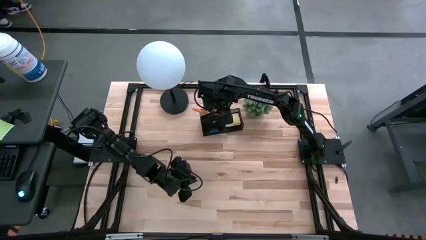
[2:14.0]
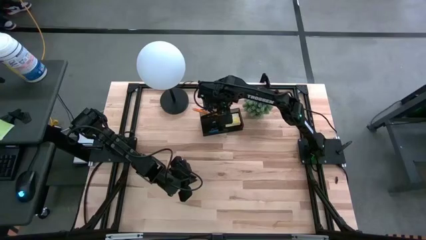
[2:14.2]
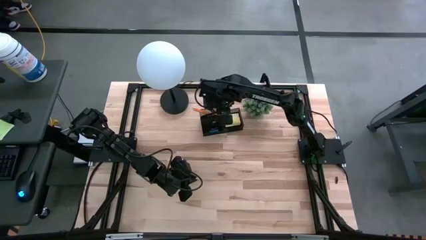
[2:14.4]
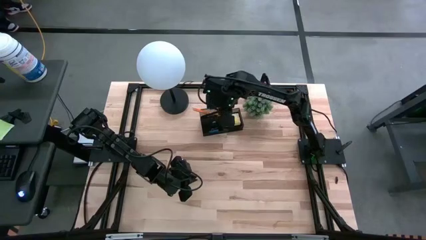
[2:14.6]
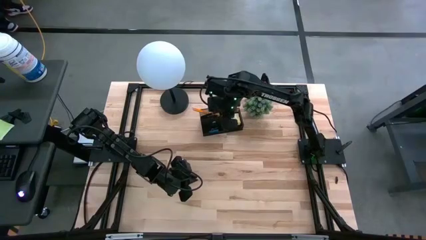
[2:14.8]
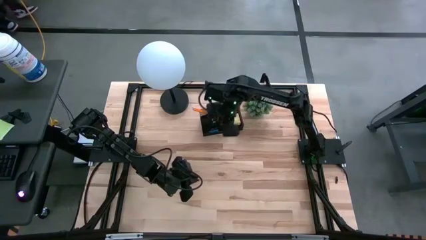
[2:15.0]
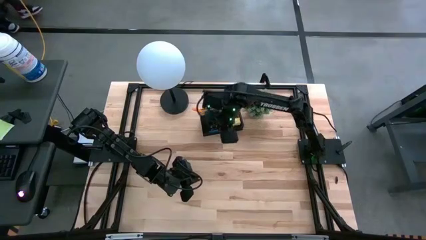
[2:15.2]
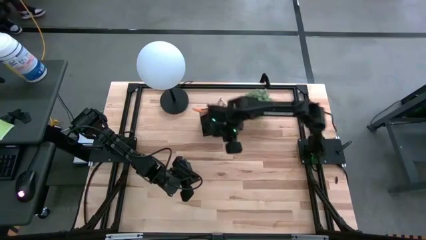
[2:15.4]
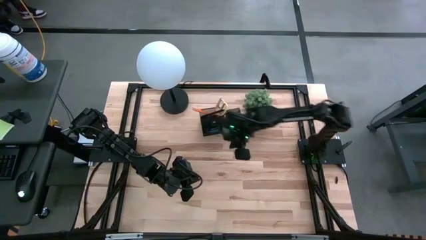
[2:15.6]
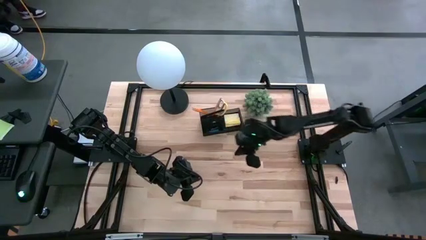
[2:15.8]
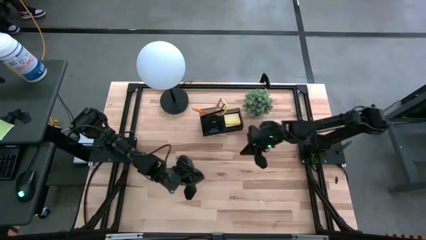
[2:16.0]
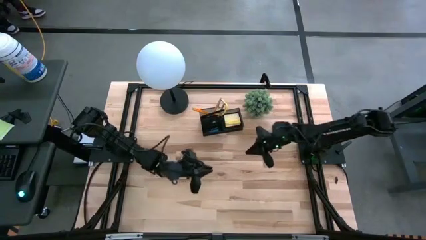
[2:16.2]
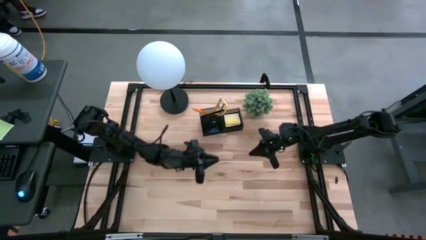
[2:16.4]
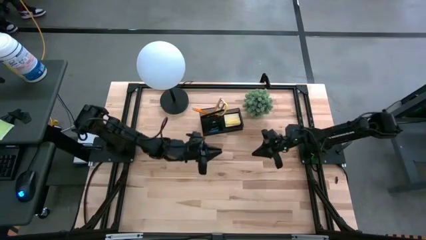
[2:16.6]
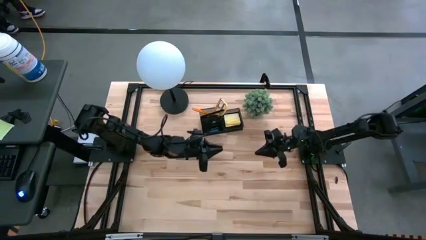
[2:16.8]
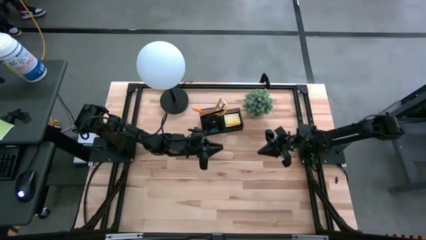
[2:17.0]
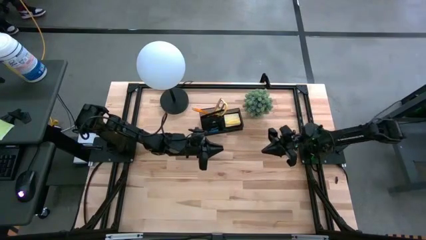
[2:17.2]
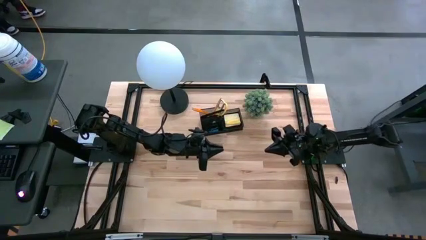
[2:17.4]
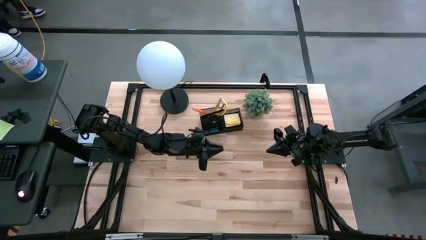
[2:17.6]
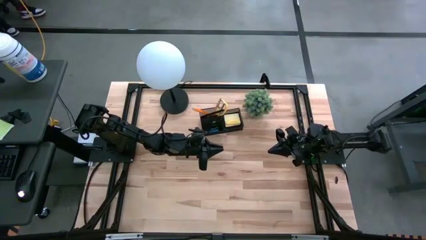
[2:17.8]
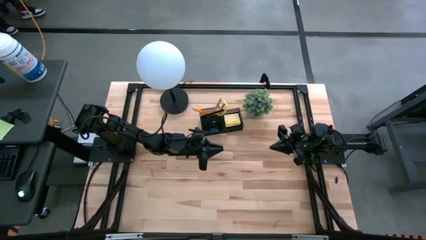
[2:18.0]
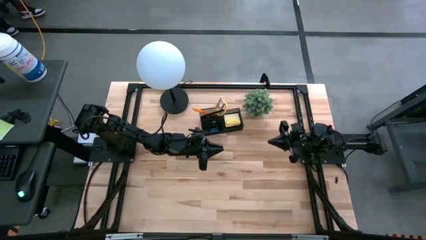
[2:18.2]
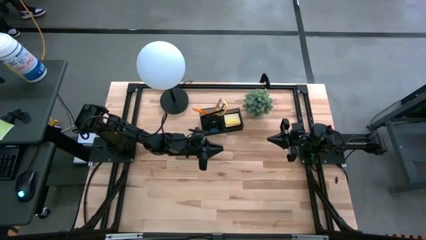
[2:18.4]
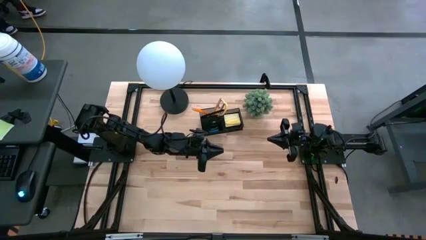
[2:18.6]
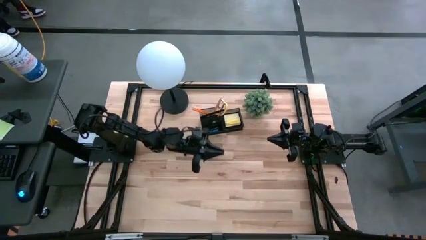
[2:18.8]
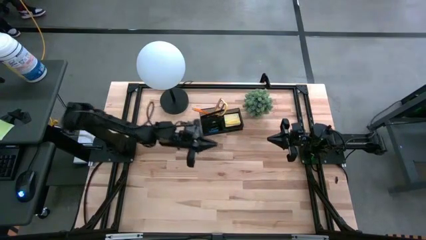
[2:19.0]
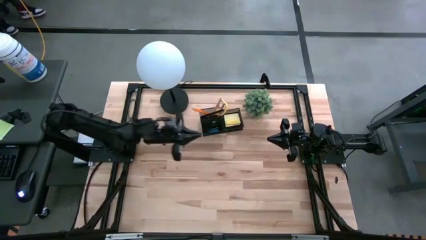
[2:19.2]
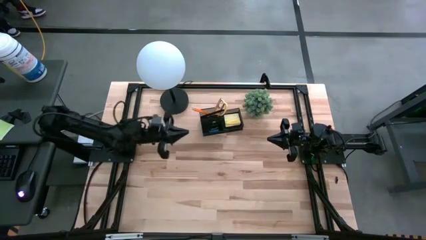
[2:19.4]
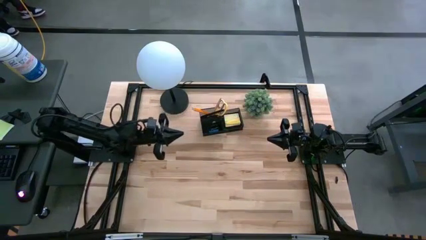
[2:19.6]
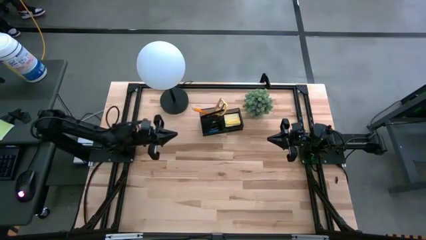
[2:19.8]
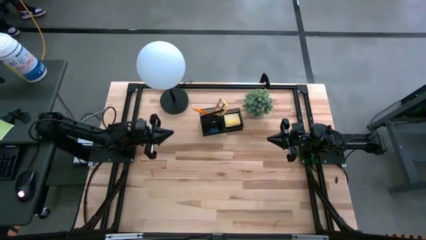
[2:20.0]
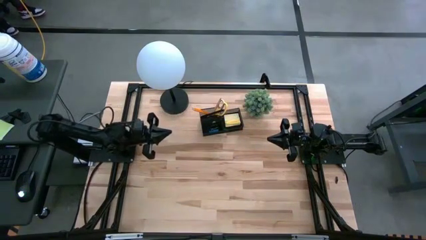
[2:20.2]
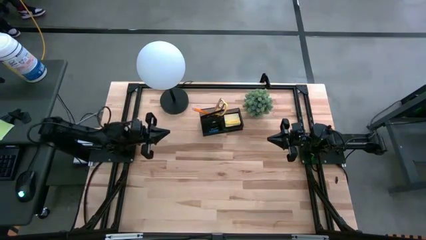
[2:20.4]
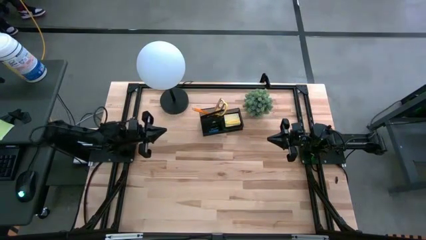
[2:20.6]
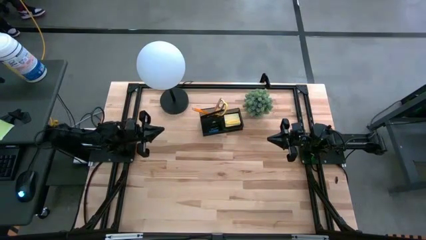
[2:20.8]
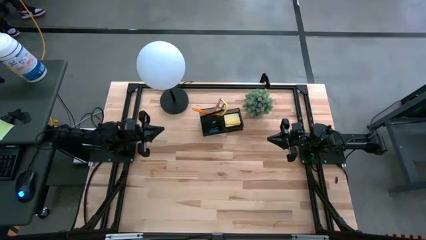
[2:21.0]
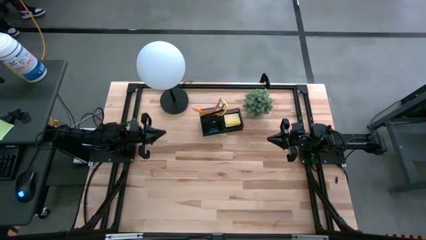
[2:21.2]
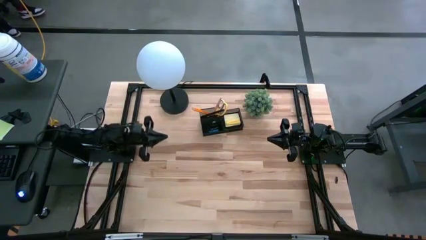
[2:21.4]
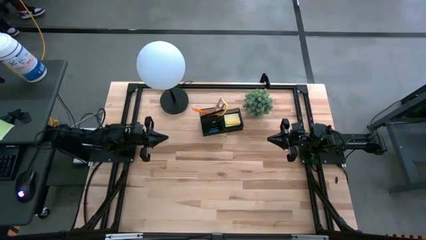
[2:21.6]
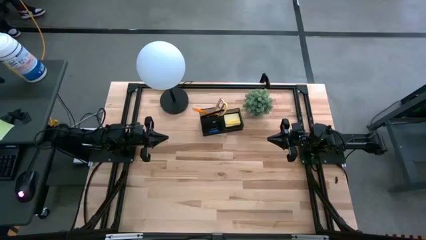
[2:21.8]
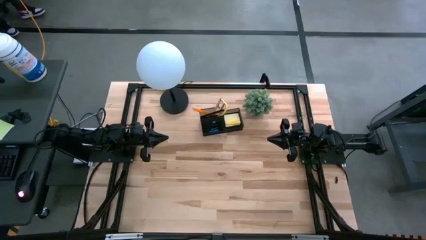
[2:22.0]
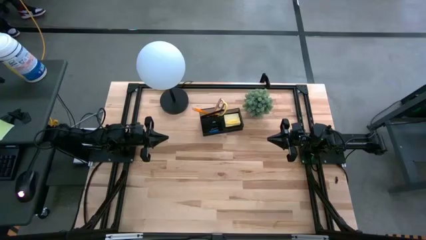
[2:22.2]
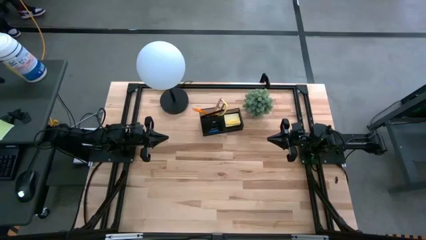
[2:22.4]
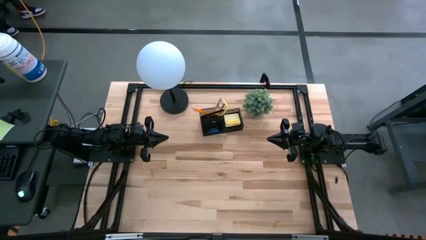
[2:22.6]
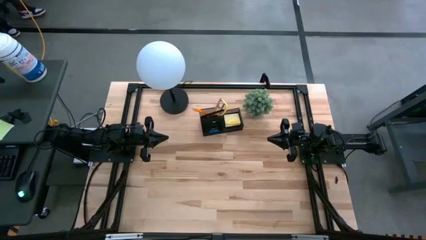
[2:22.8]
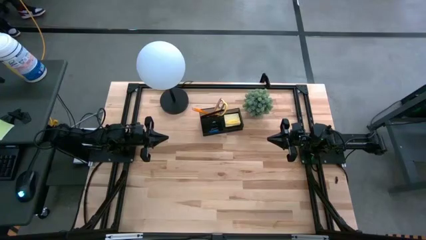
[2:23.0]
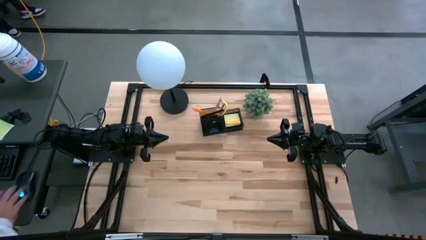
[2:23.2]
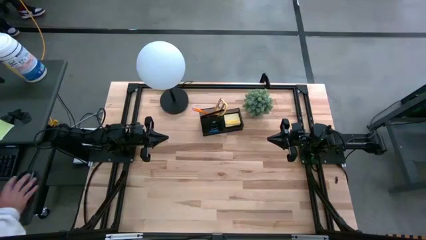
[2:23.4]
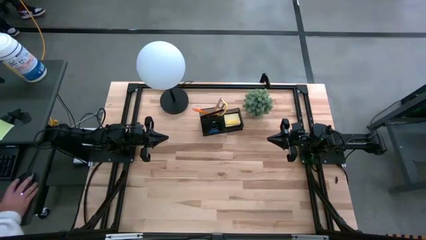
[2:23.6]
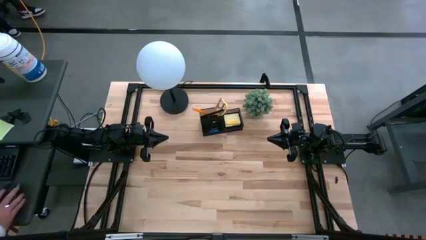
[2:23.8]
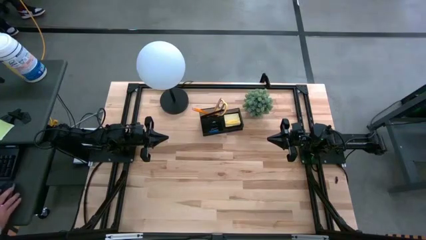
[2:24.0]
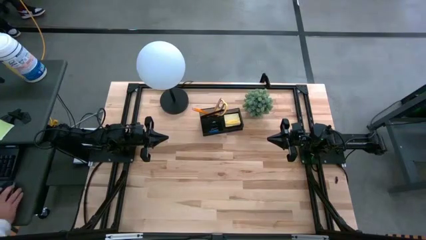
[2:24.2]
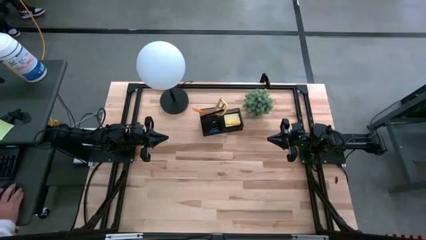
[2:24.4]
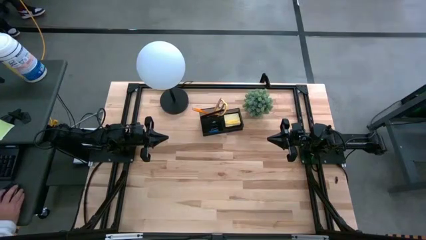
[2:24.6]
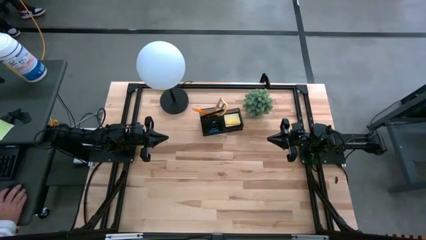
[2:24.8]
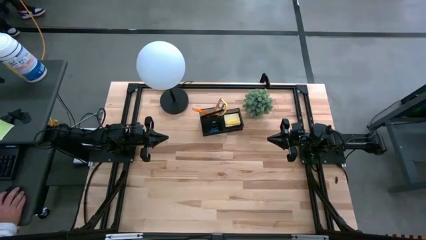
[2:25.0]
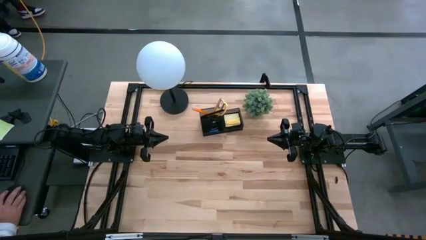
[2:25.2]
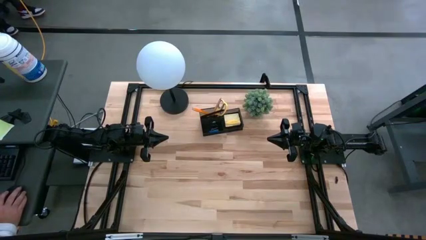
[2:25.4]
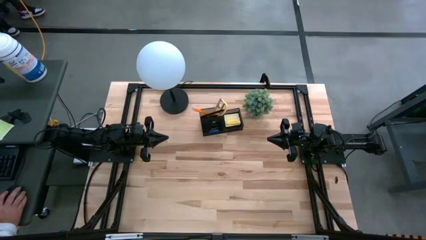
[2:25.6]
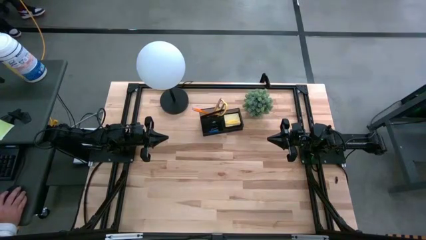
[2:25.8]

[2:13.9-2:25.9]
Task: Pick and place office supplies into organizer
Return to Home Position

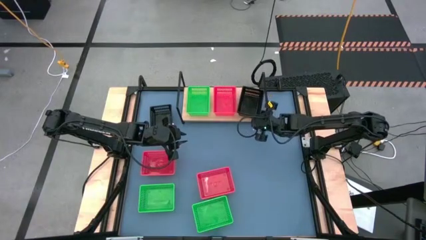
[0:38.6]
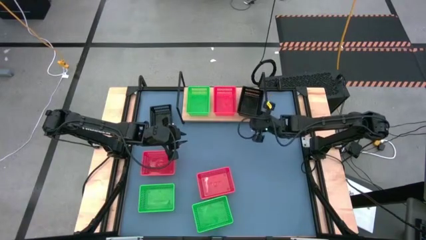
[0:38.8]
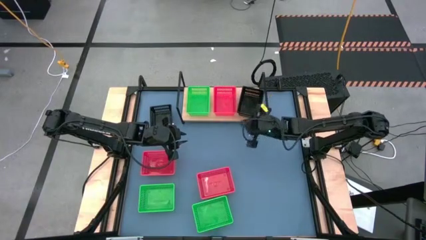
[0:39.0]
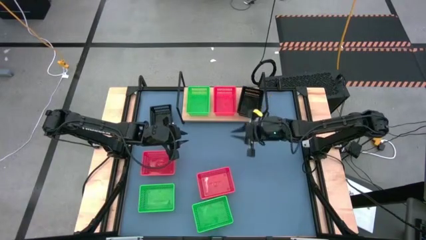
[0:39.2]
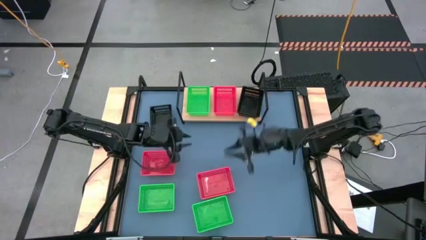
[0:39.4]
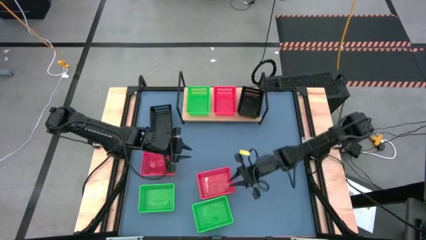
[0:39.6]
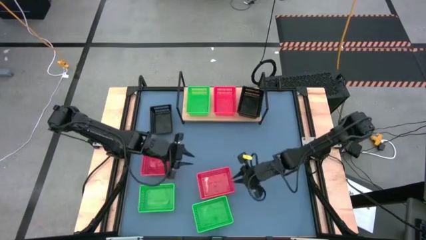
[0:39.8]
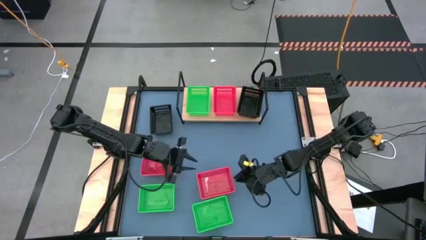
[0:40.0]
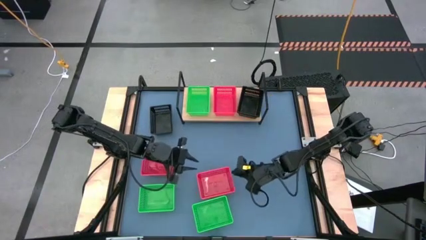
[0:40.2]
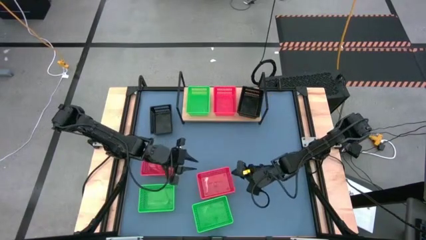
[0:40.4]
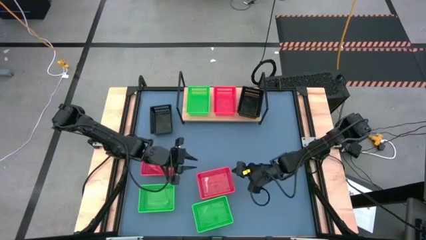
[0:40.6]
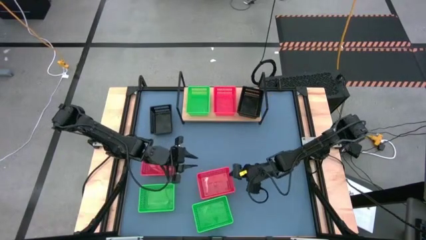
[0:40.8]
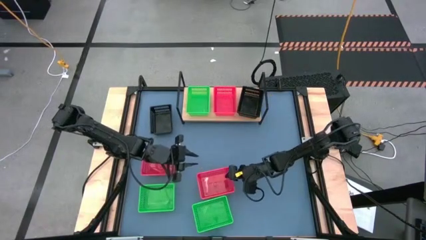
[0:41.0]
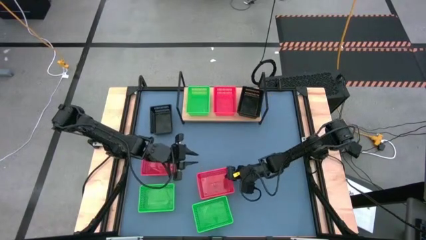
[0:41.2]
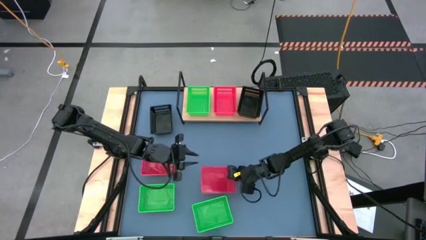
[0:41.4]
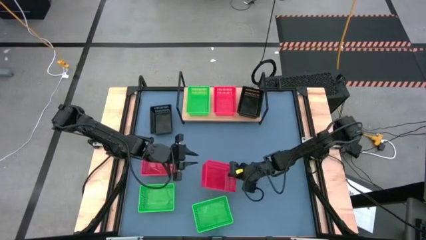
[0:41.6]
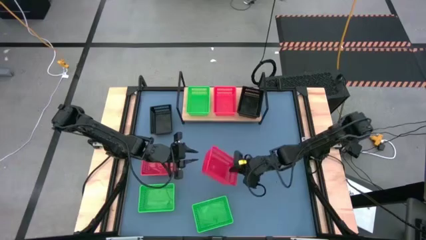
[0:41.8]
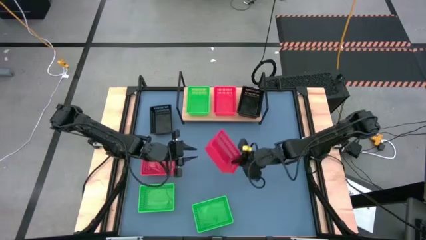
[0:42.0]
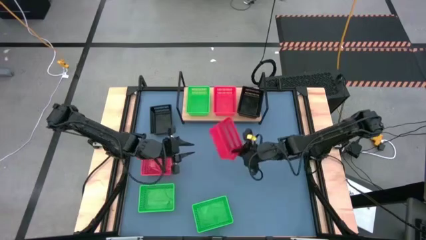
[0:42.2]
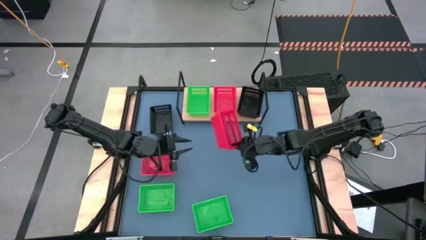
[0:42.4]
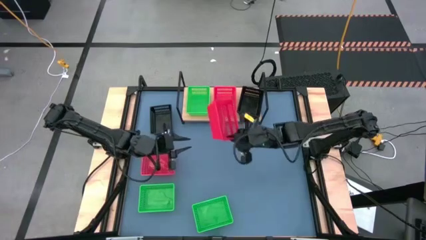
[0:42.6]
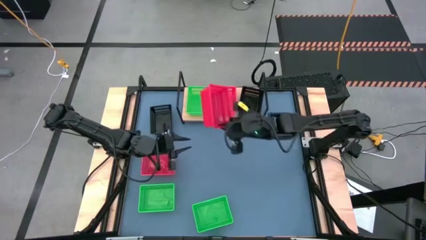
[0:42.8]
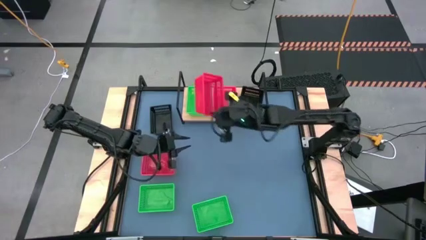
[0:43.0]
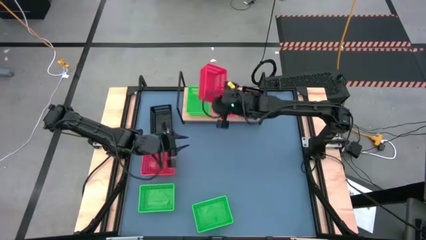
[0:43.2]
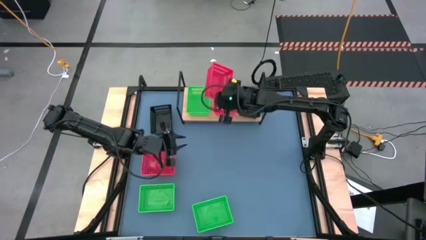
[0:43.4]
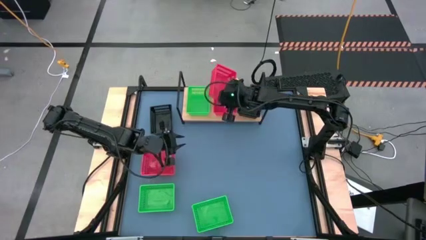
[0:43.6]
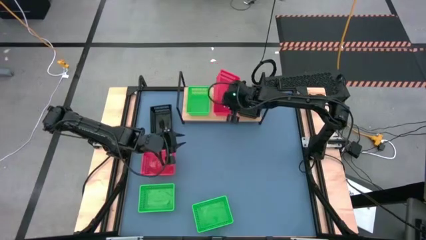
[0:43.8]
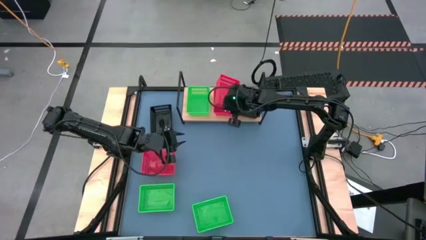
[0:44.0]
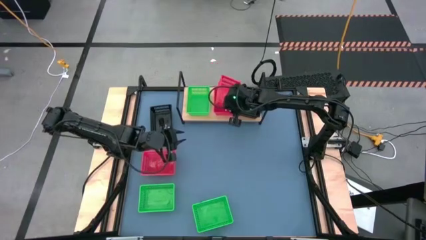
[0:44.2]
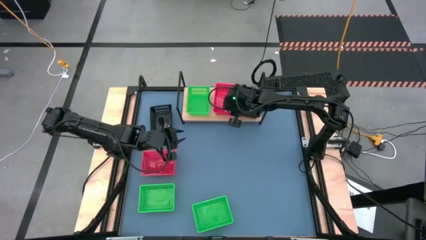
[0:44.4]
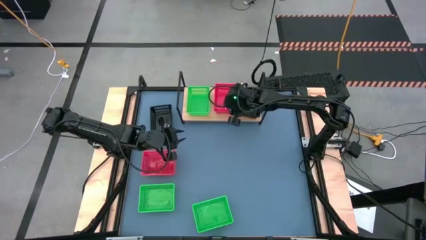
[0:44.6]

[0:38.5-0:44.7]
Task: Stack baskets on shelf by color
Stack the right red bin on the red bin on the shelf
